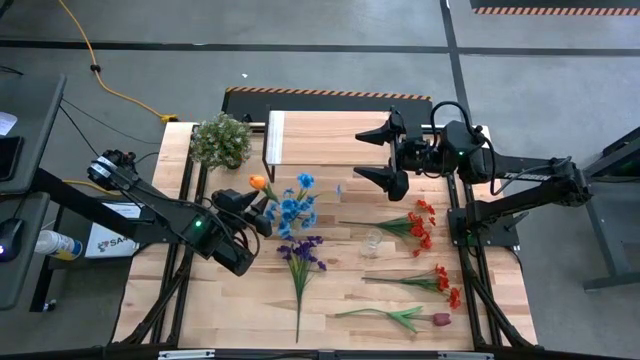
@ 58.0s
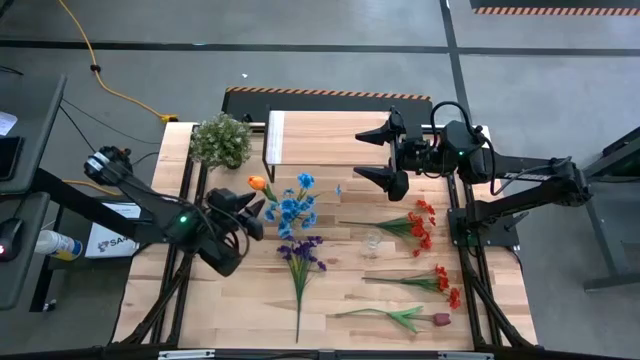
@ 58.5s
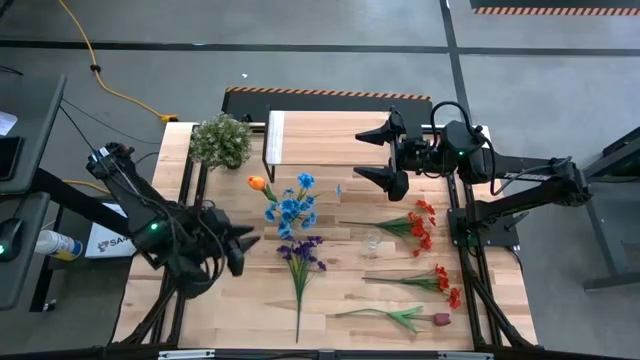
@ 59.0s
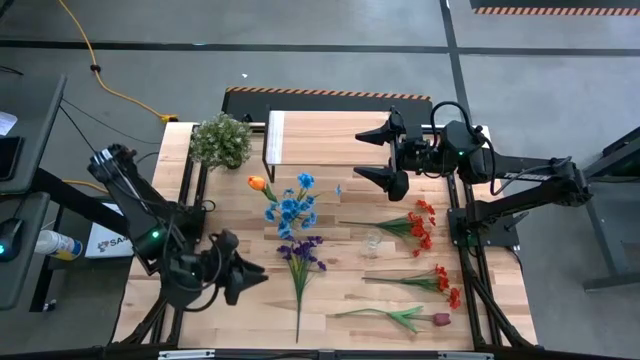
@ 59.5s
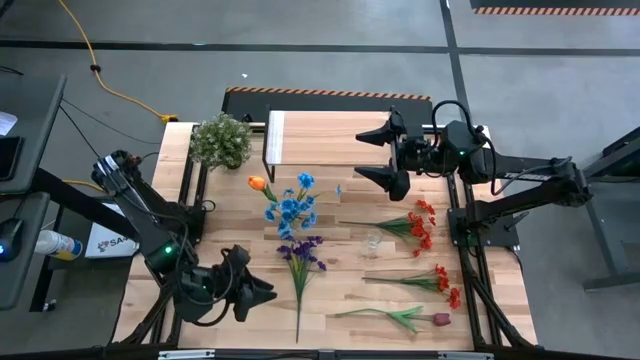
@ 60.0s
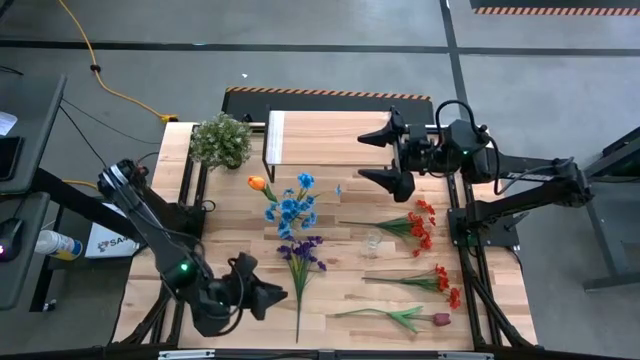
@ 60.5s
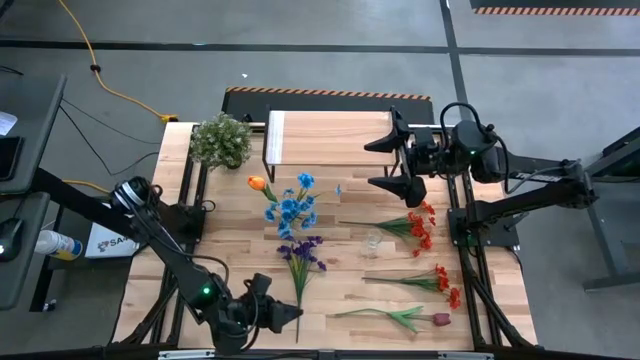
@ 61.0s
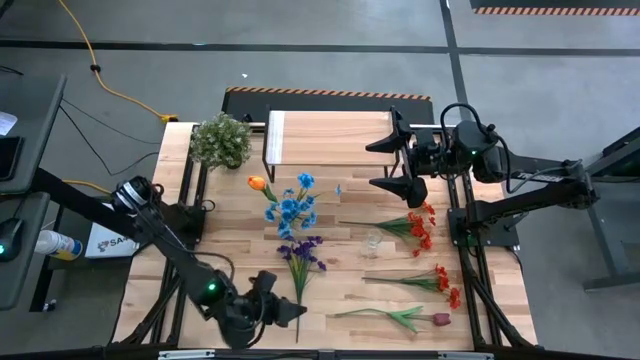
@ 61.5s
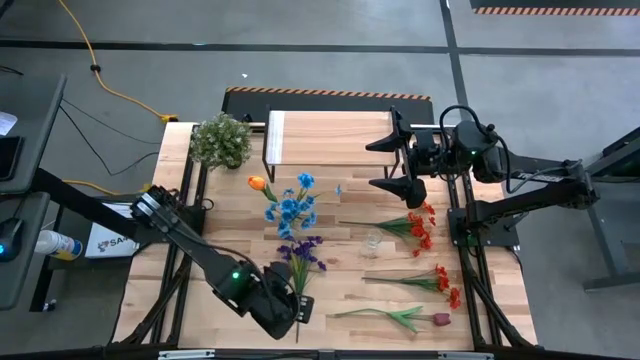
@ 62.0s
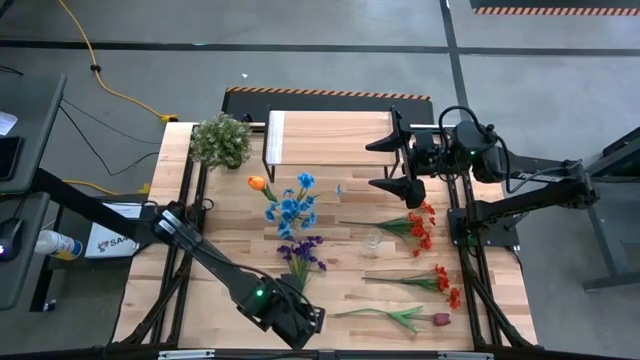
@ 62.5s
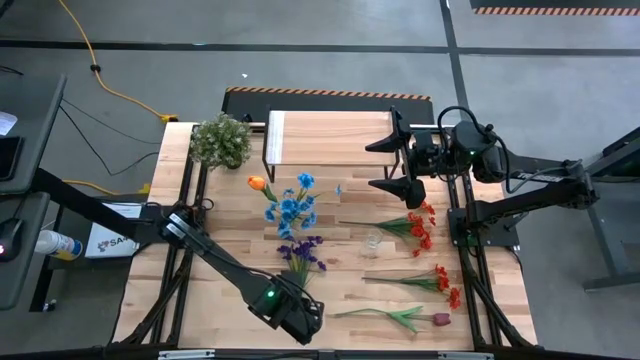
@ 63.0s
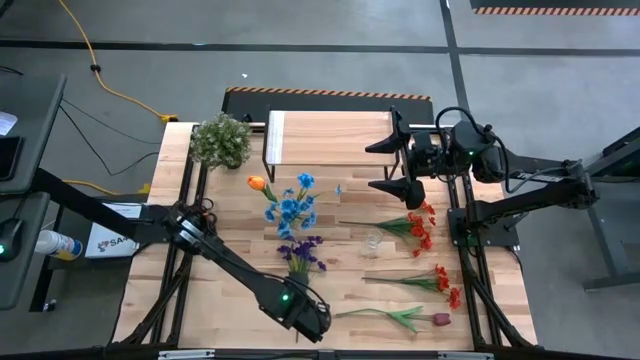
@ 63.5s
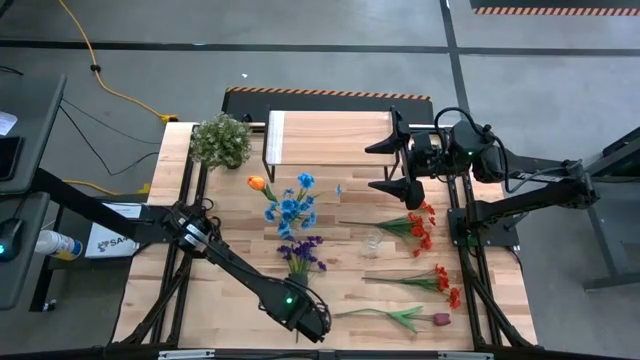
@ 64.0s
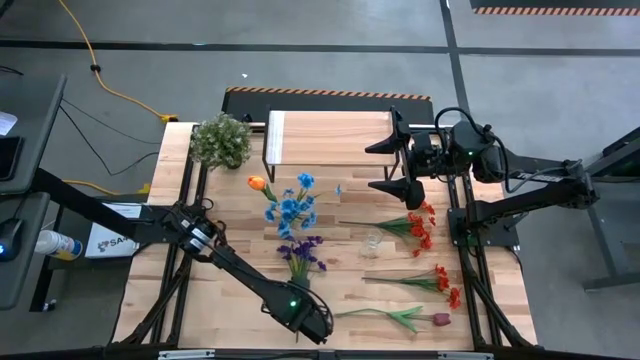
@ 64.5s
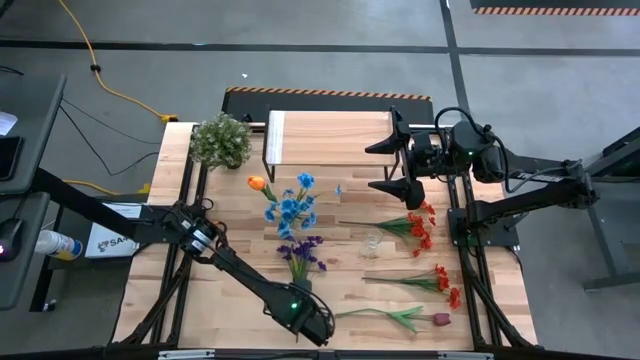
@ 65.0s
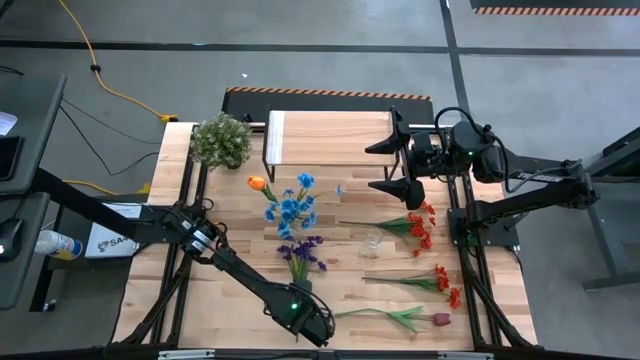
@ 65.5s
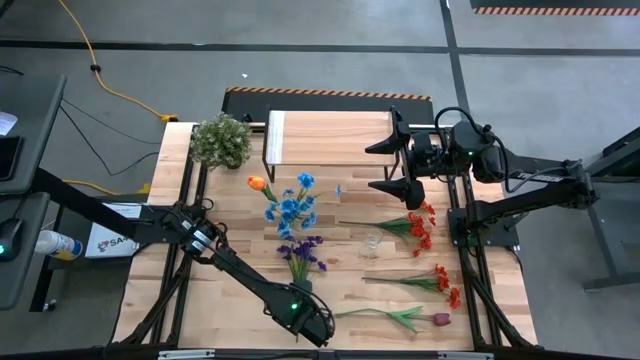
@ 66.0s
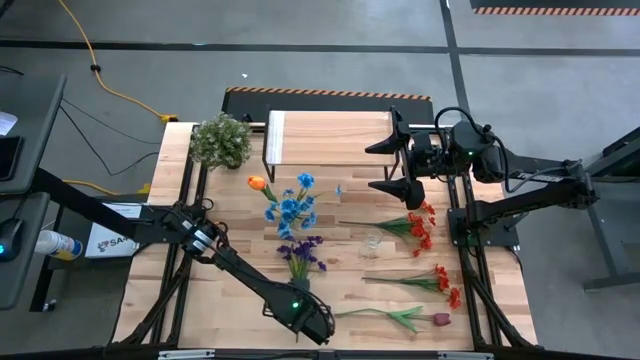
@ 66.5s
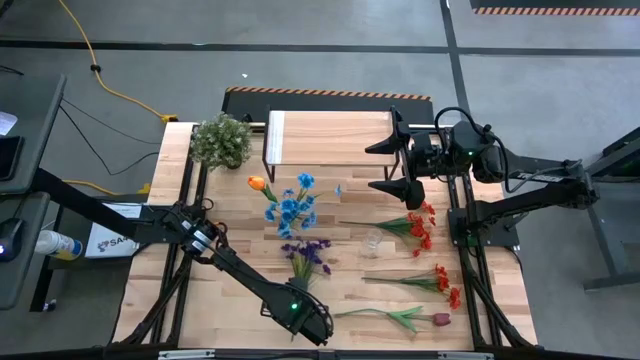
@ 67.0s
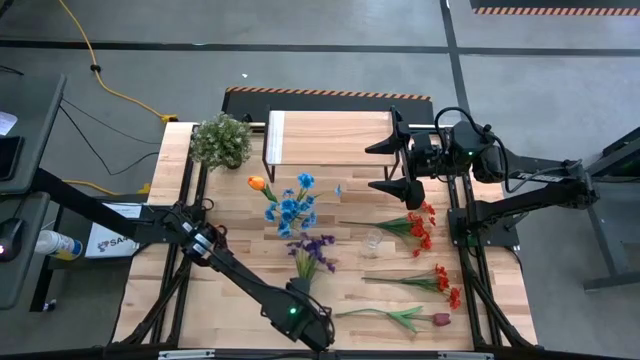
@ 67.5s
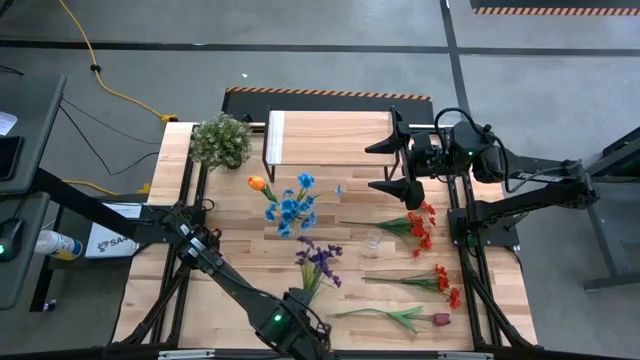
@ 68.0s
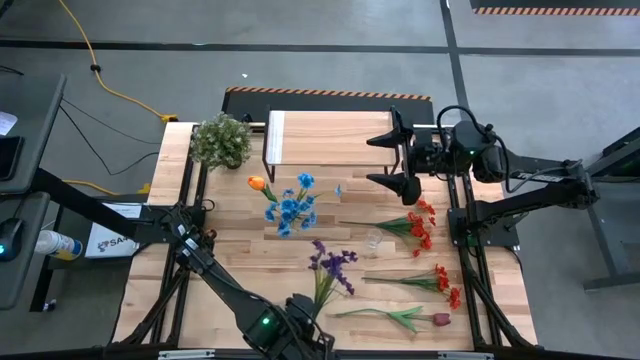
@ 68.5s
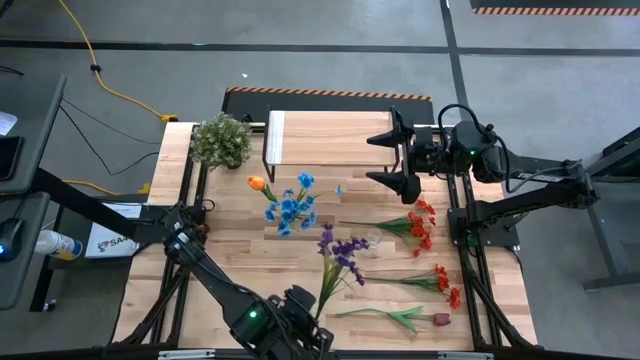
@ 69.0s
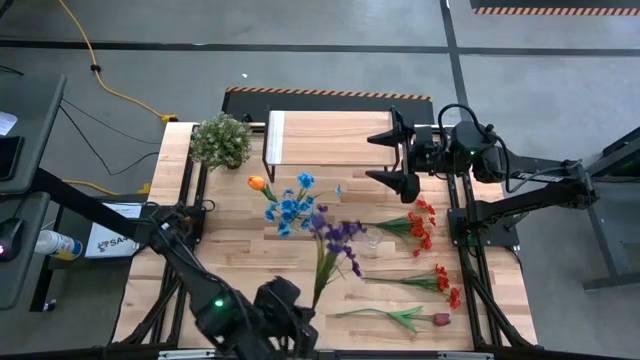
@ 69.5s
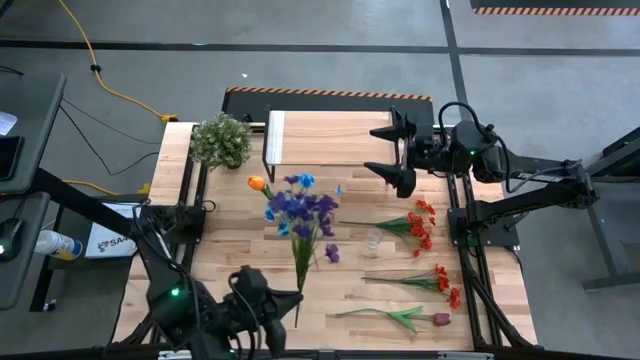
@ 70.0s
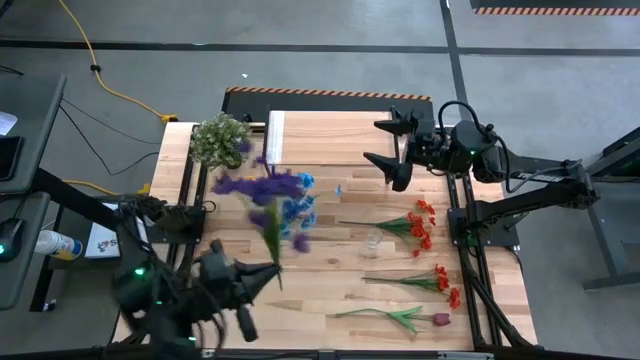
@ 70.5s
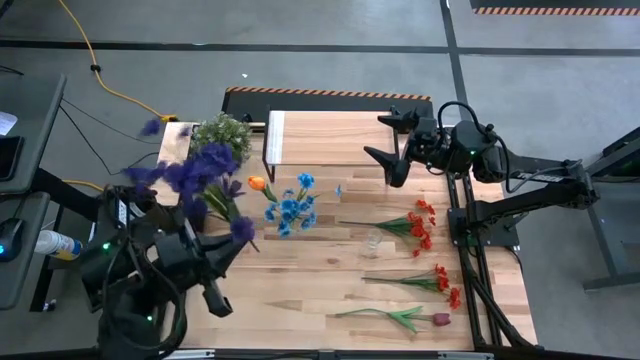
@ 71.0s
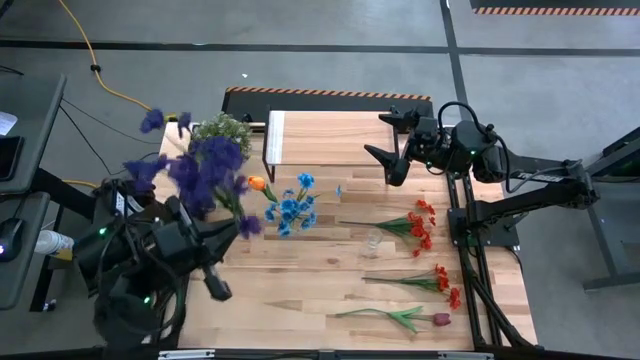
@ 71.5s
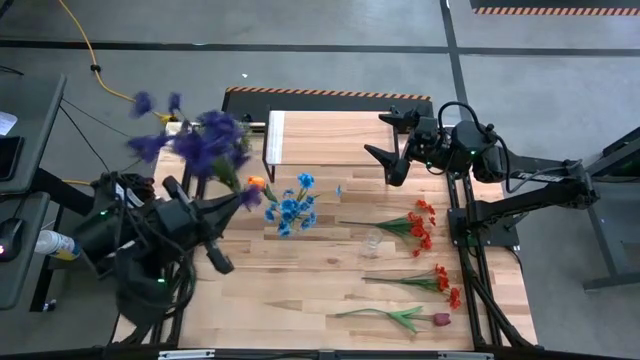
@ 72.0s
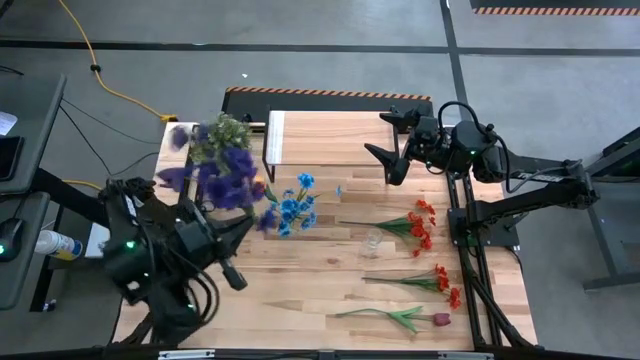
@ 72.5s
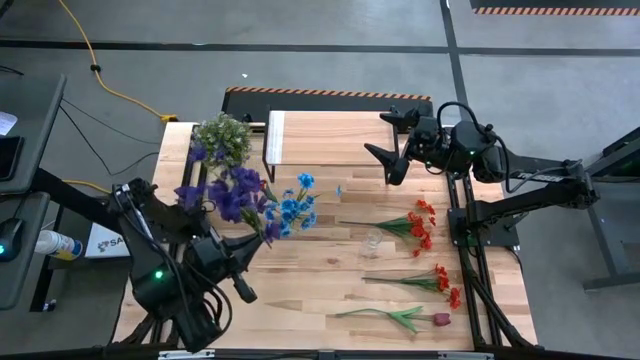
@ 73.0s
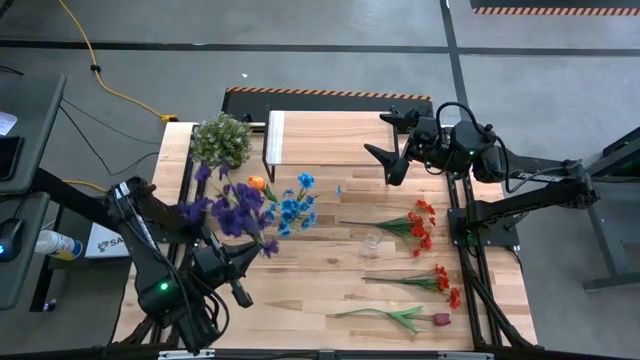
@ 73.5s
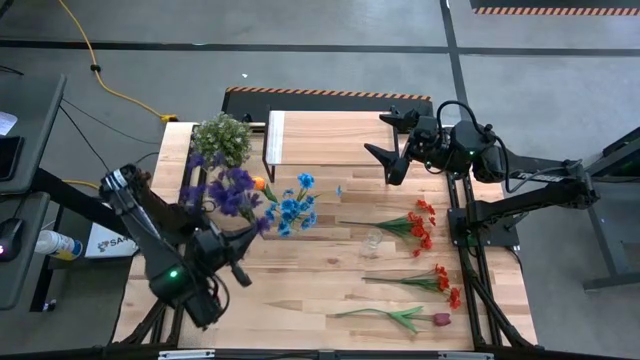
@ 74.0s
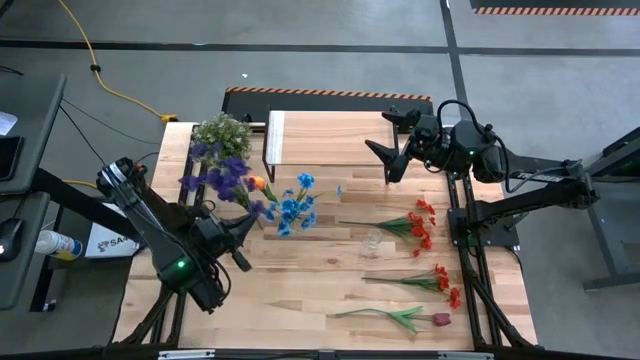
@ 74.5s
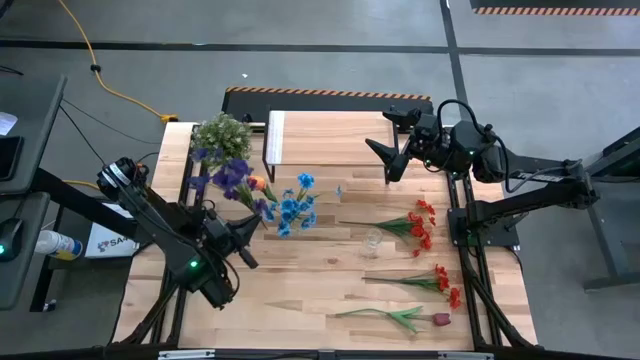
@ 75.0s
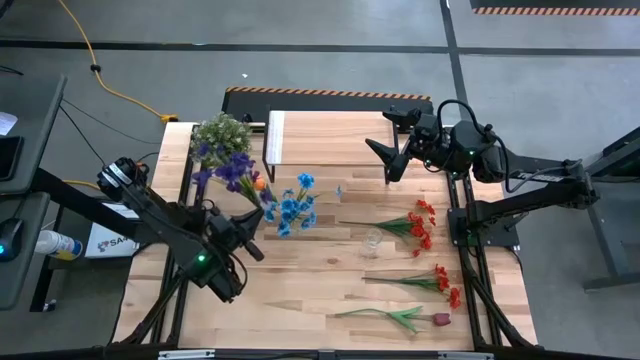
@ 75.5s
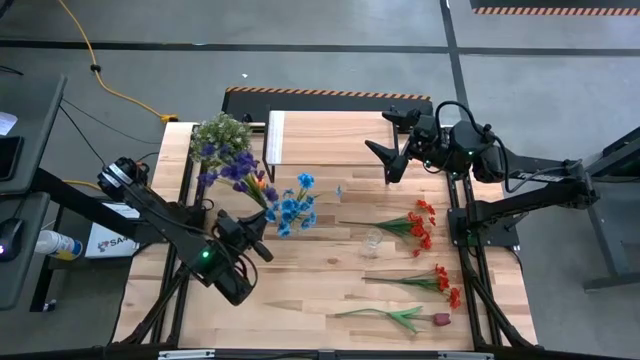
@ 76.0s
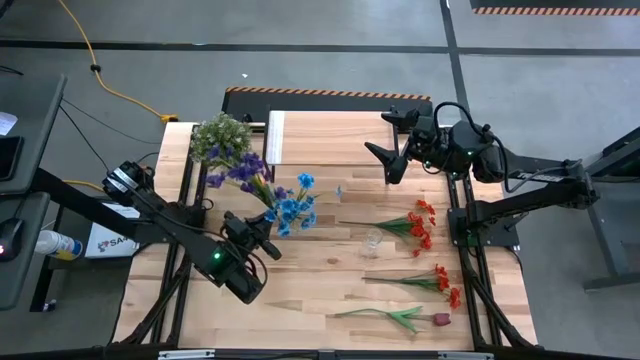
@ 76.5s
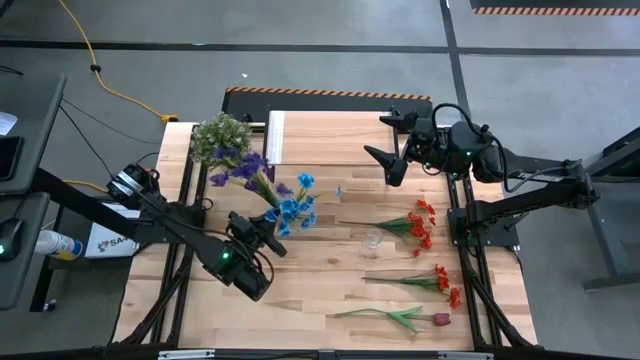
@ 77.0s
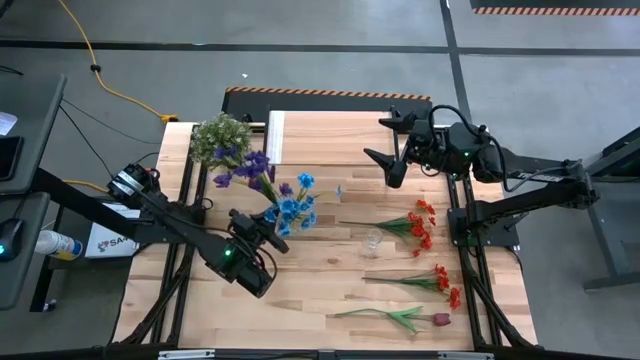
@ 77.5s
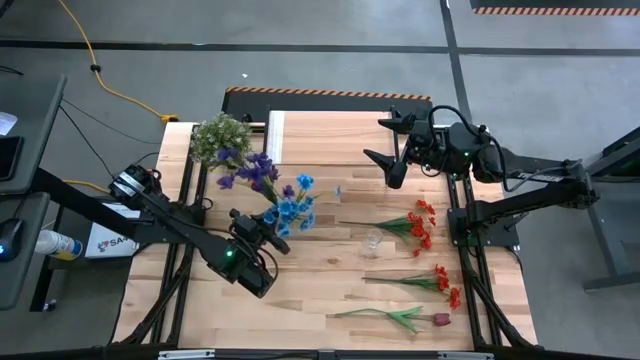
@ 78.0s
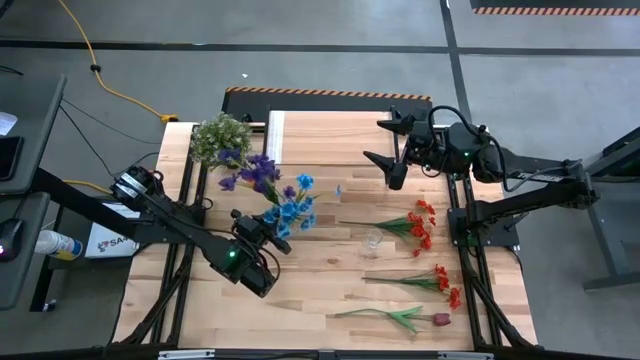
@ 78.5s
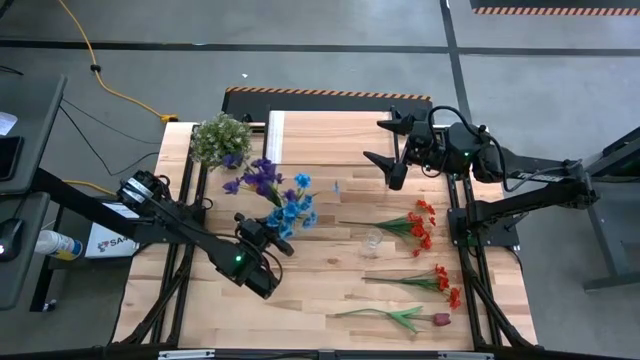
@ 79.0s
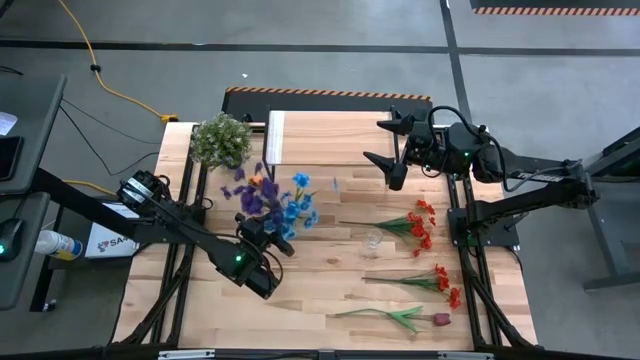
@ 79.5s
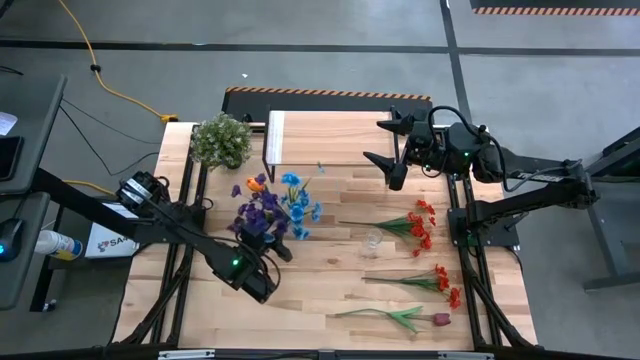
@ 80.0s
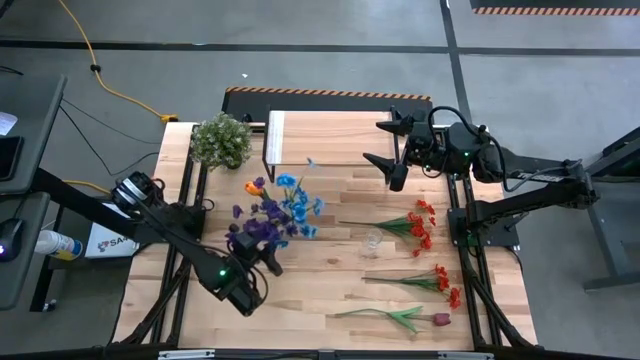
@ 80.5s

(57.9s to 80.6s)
Task: Pick and place flowers into a vace then onto a shelf
Put the dark blue flowers into the left transparent vase
